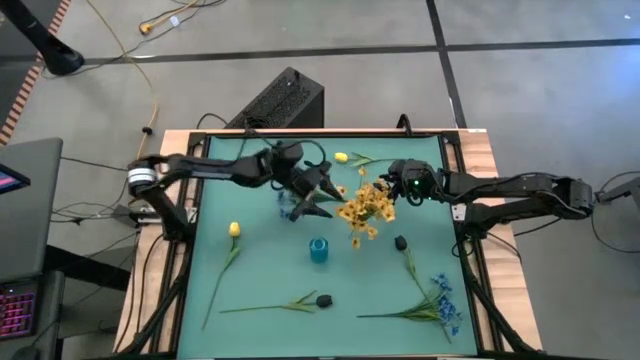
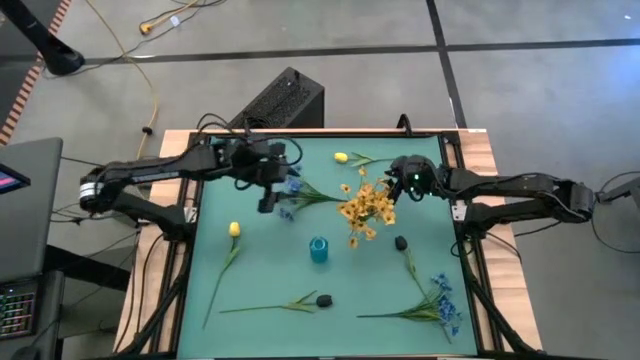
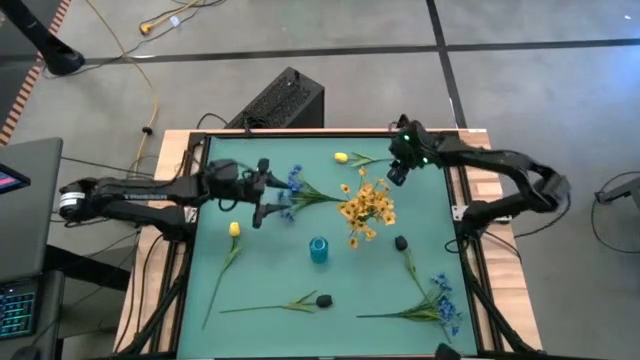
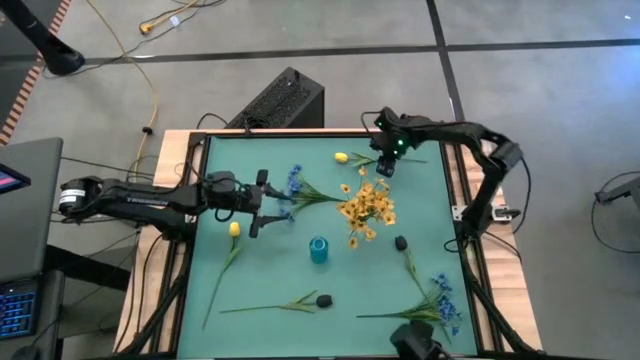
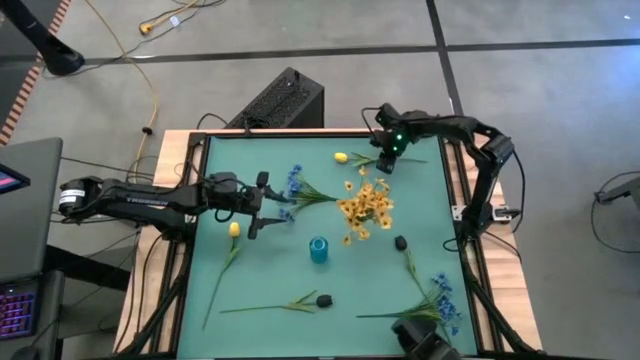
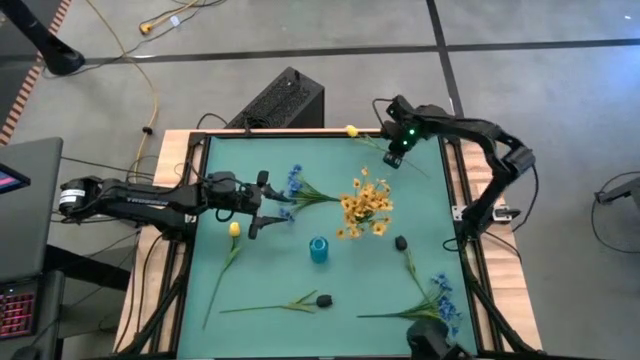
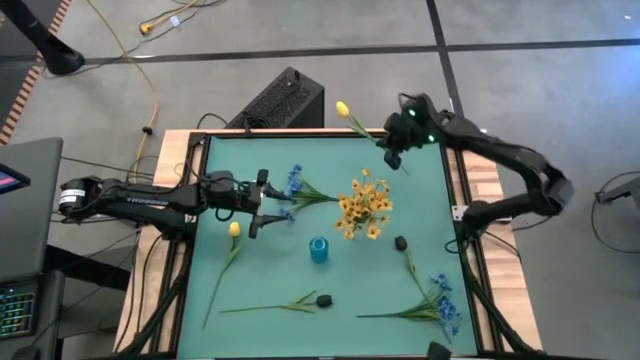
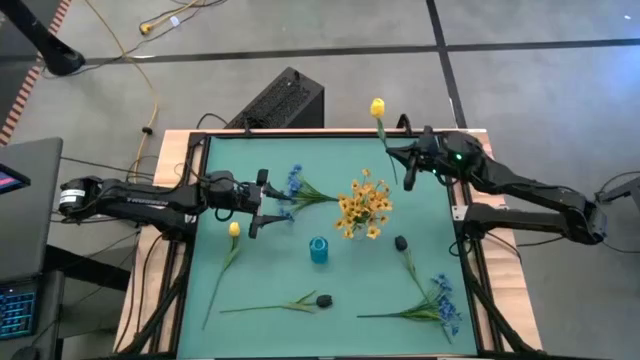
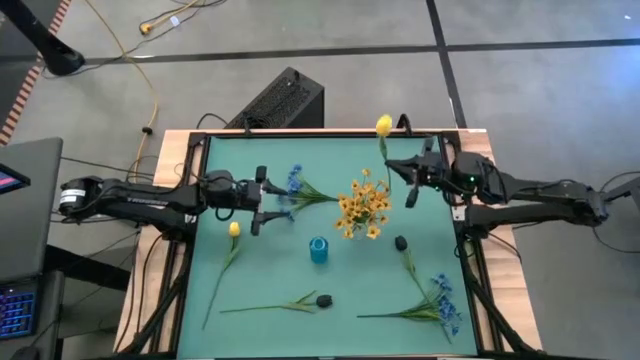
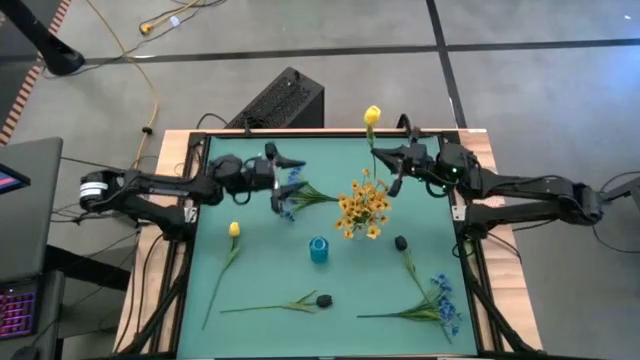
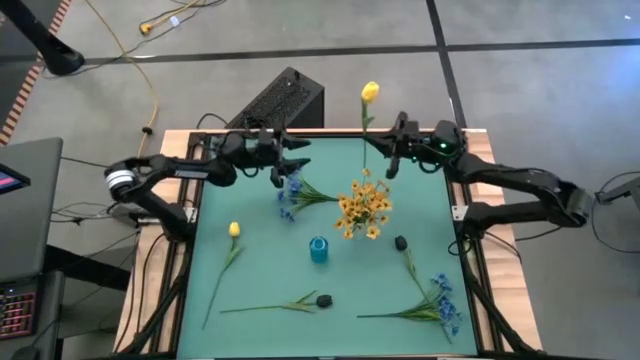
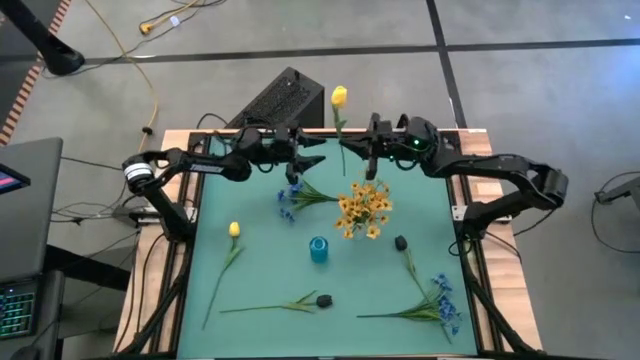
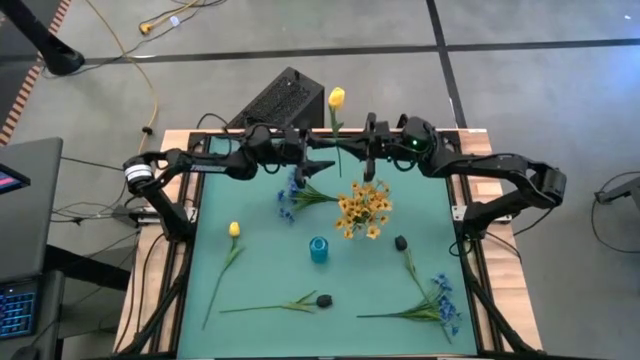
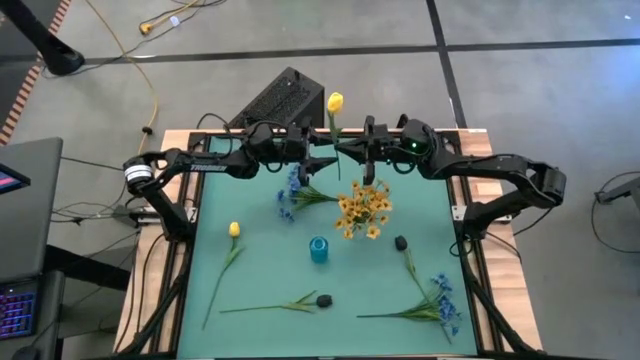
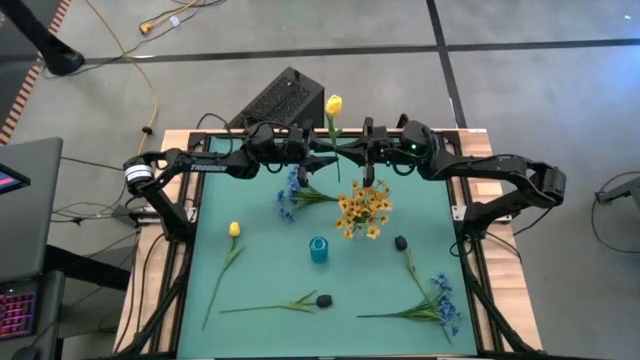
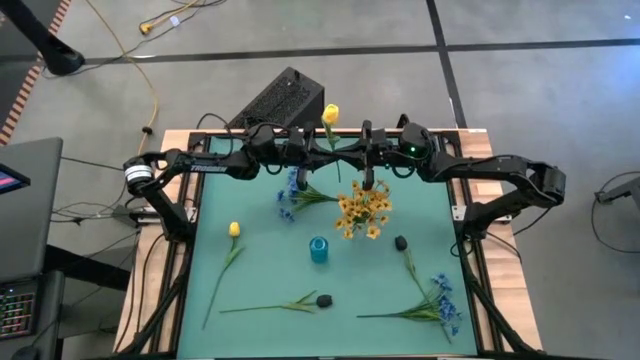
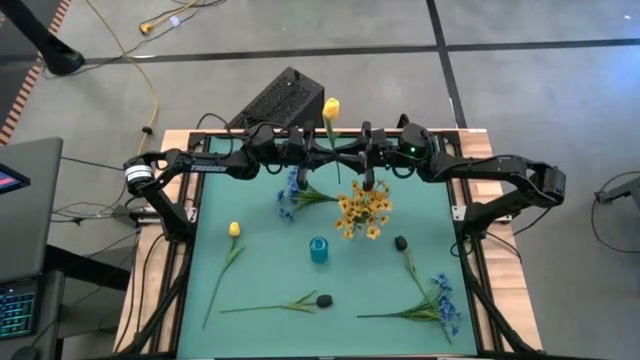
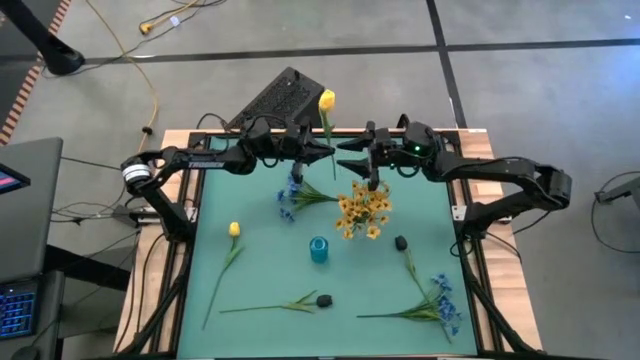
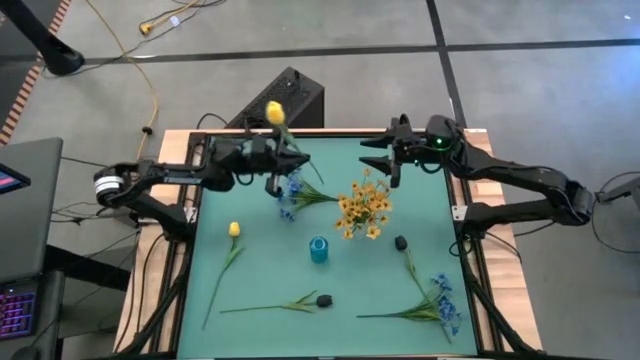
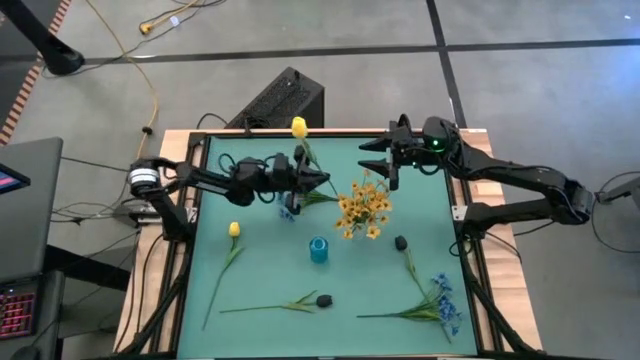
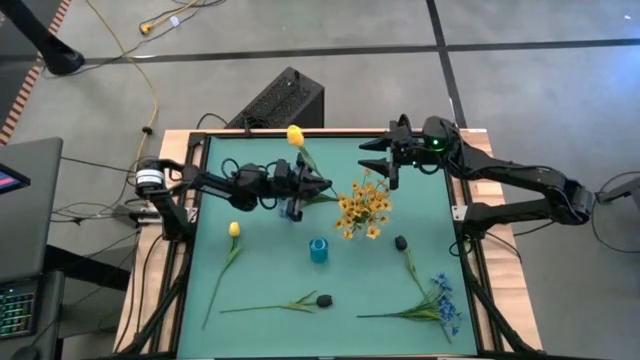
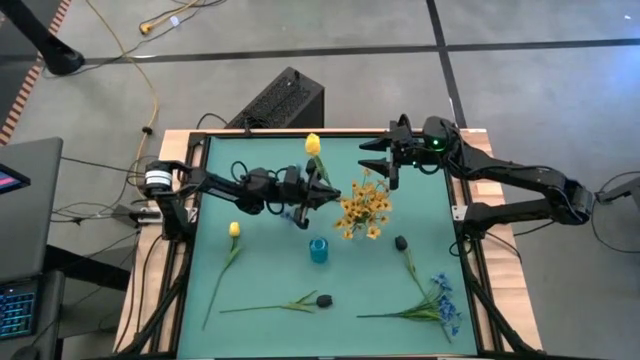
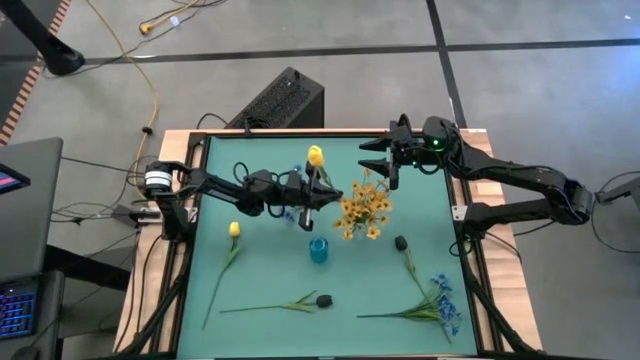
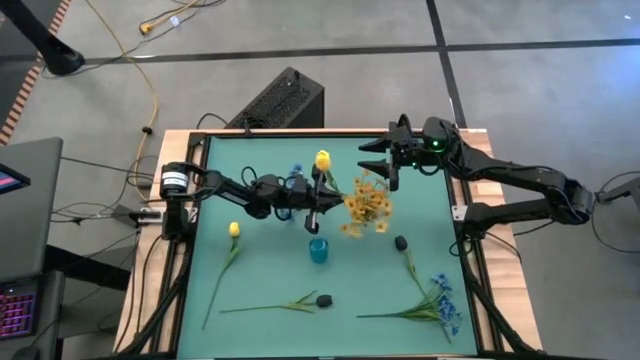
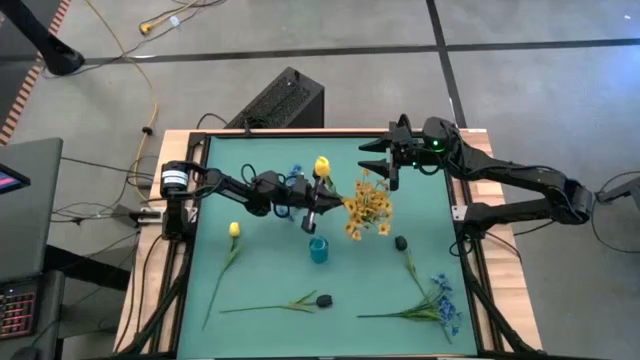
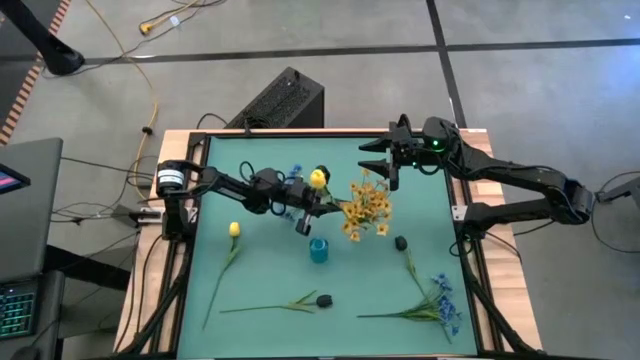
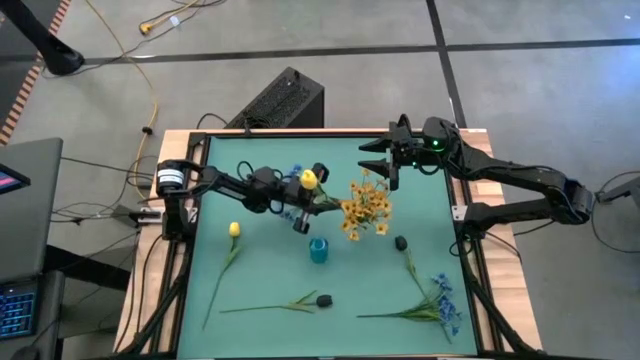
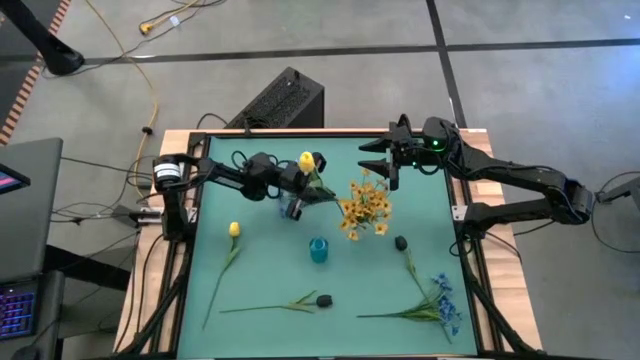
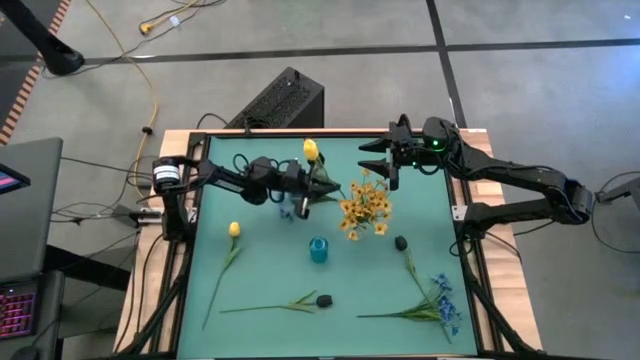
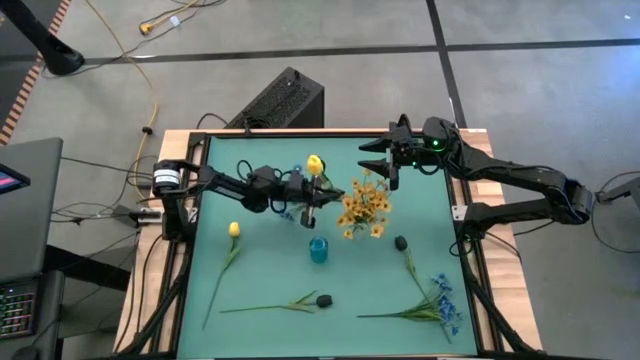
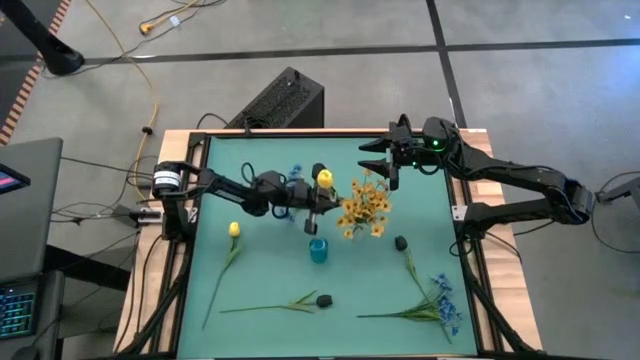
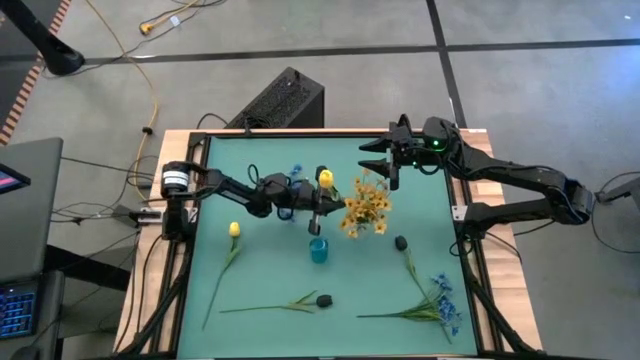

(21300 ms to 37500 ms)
Task: Sort flowers into vase by color
Put the top yellow tulip into the transparent vase

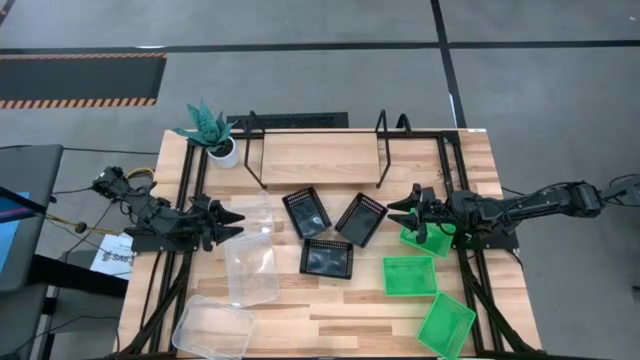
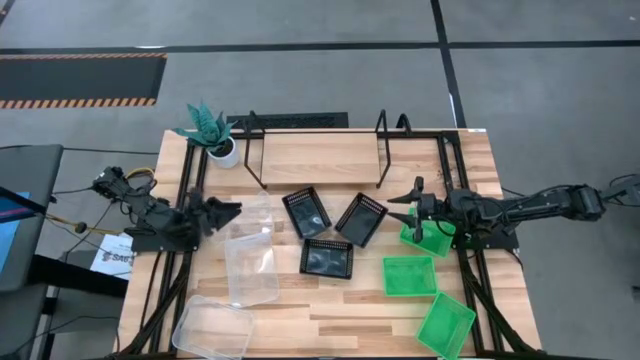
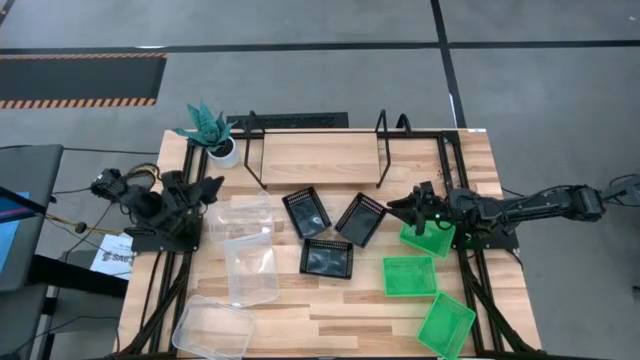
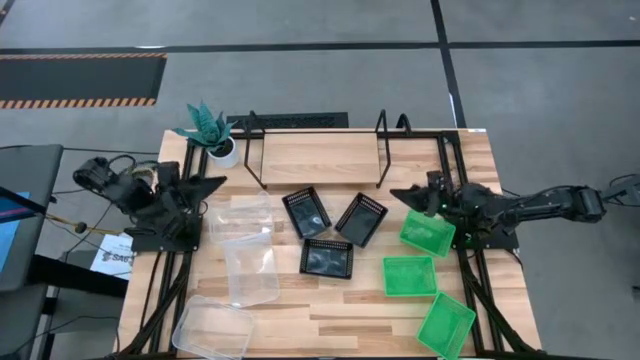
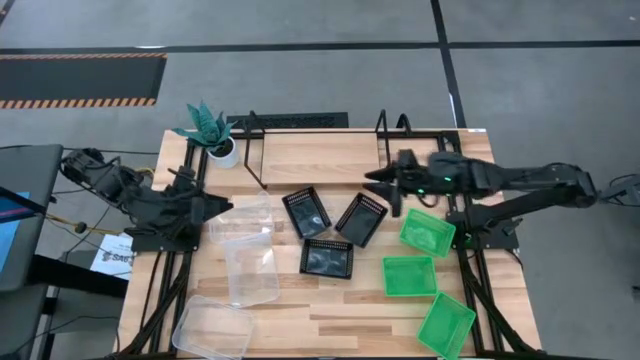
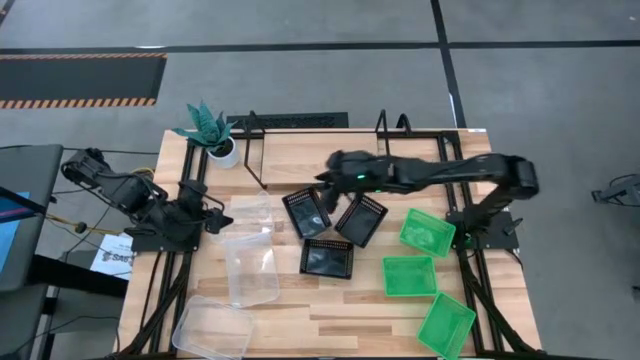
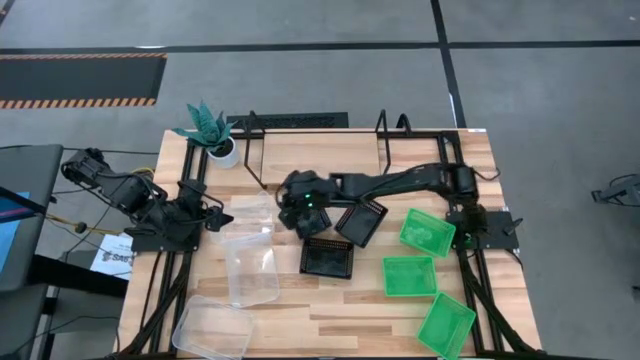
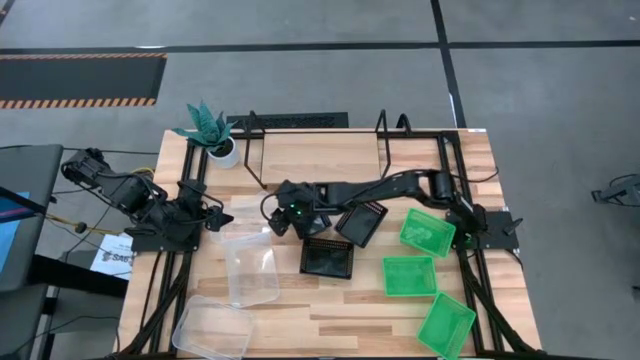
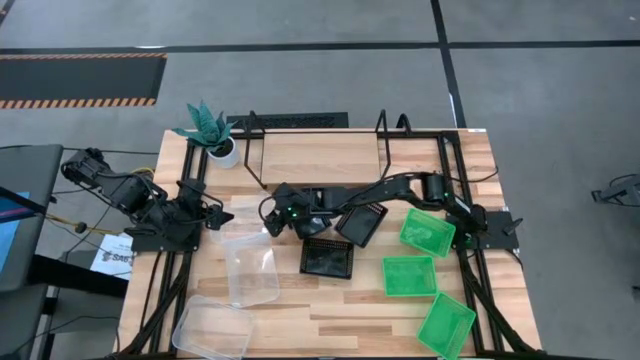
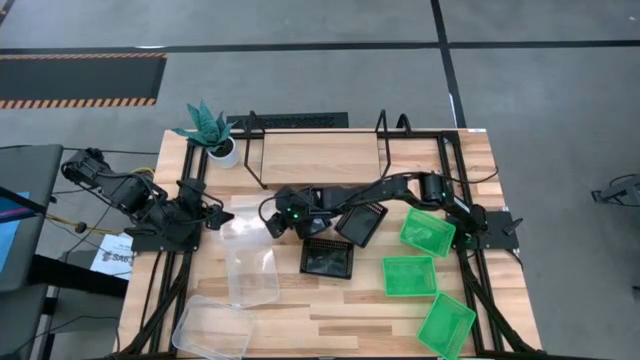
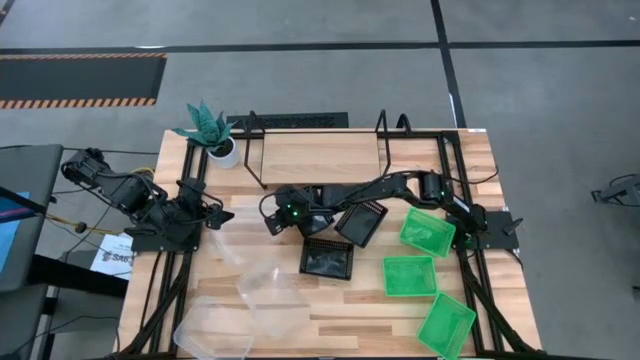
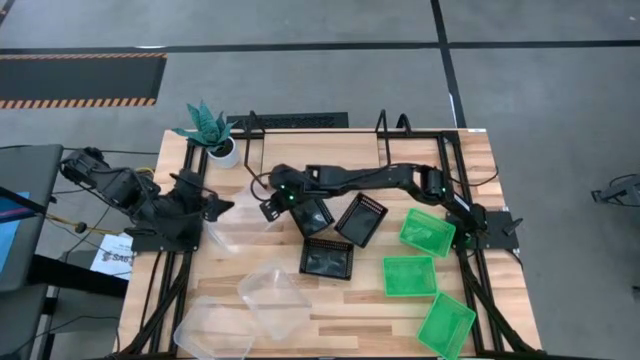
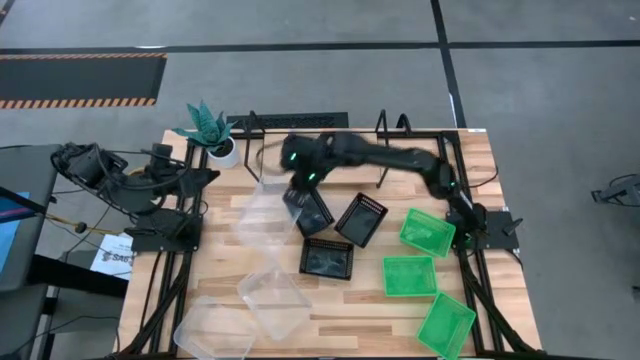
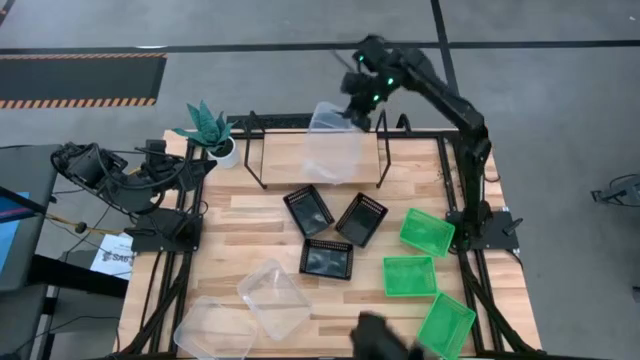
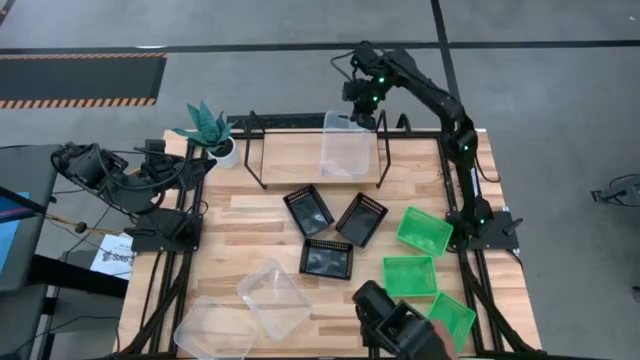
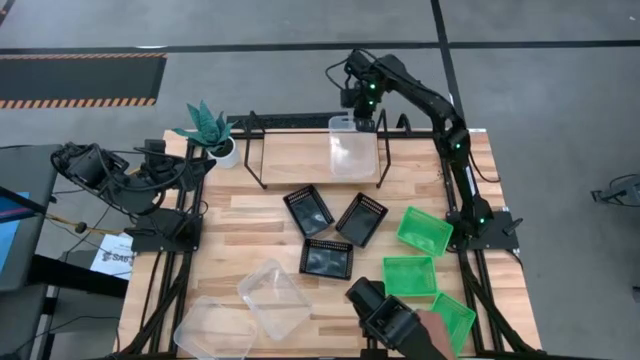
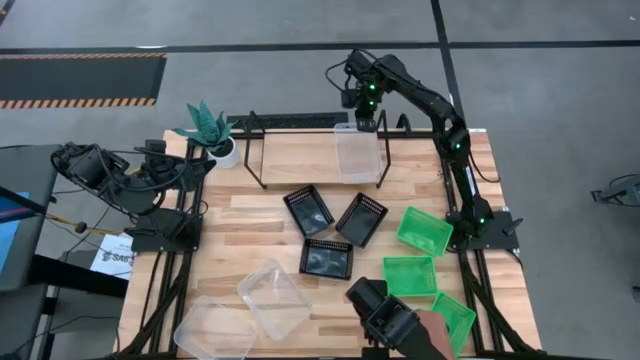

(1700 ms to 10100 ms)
Task: Stack baskets on shelf by color
Put the top transparent bin on the shelf
